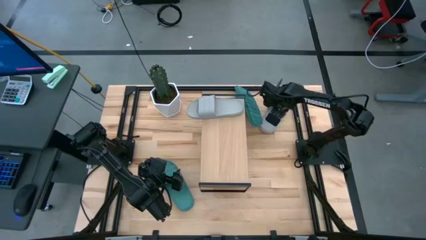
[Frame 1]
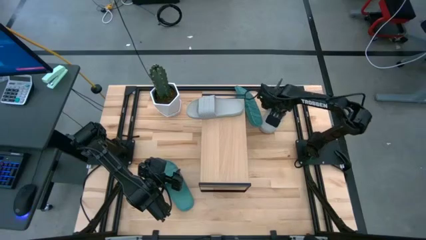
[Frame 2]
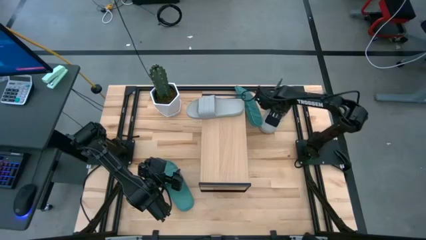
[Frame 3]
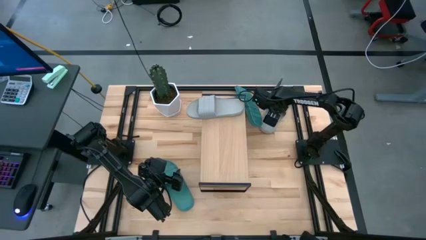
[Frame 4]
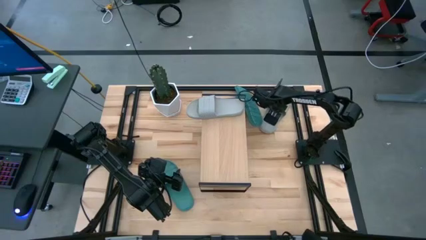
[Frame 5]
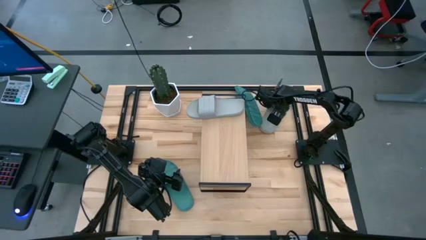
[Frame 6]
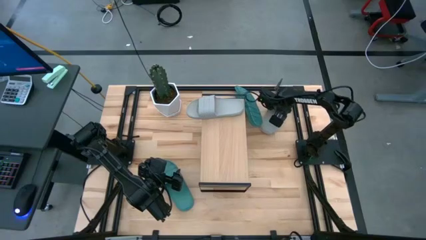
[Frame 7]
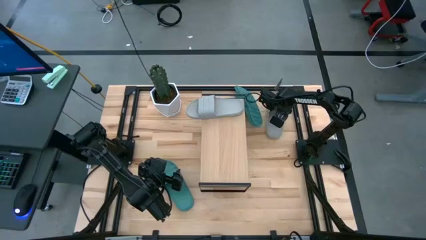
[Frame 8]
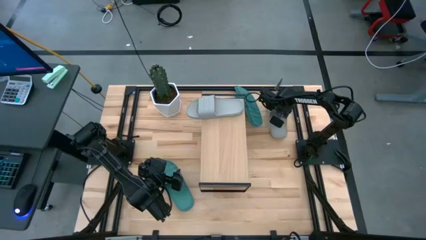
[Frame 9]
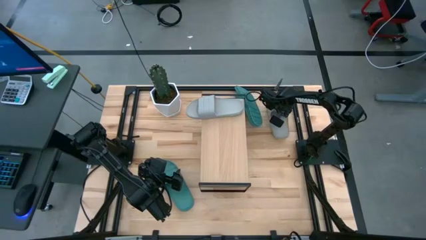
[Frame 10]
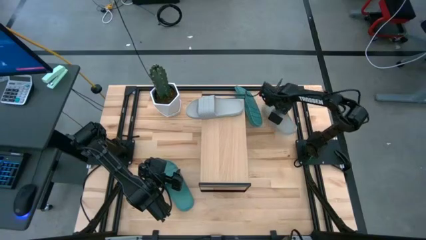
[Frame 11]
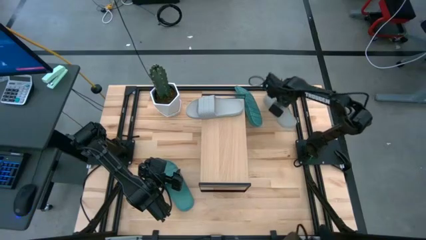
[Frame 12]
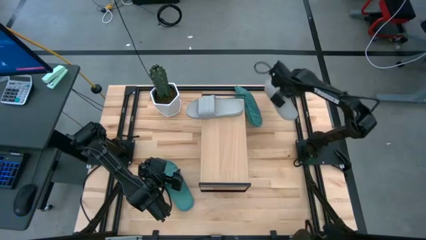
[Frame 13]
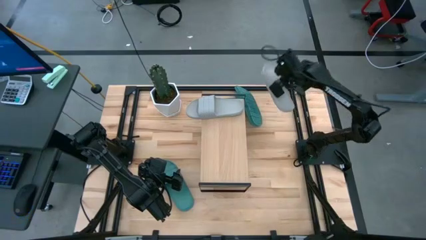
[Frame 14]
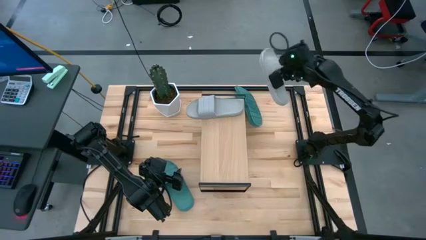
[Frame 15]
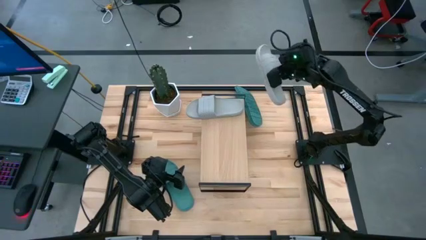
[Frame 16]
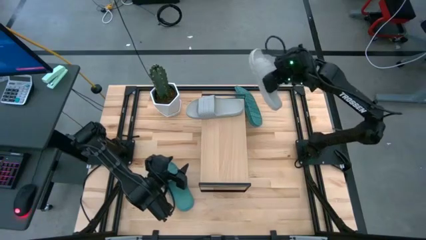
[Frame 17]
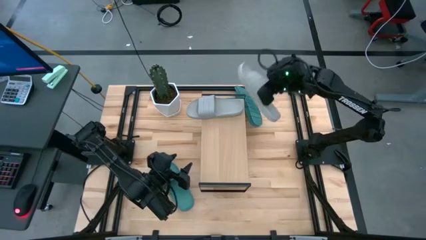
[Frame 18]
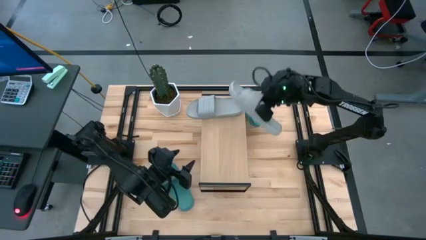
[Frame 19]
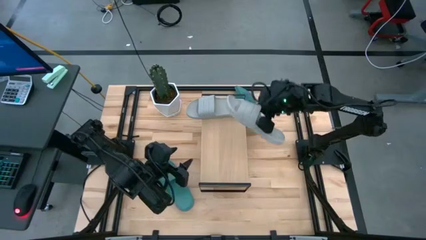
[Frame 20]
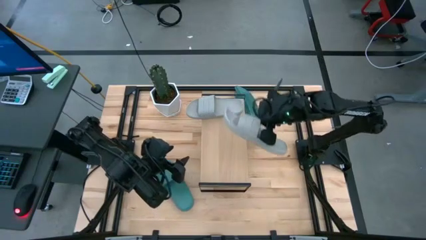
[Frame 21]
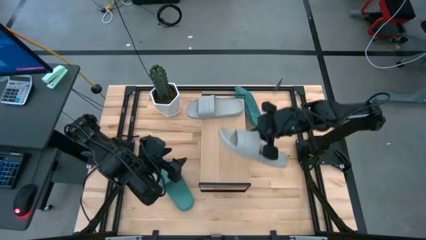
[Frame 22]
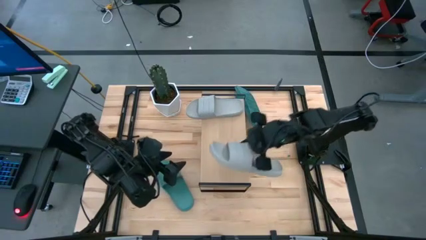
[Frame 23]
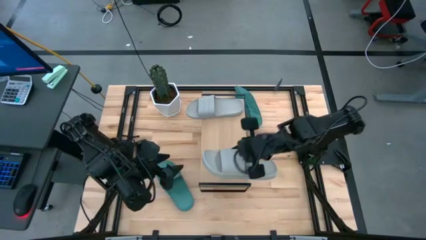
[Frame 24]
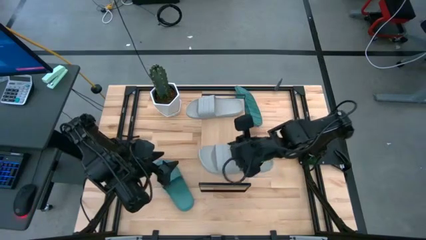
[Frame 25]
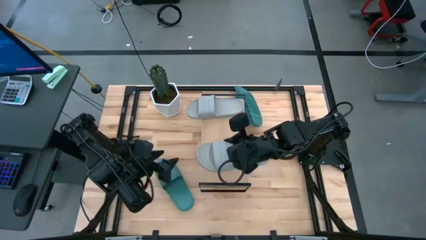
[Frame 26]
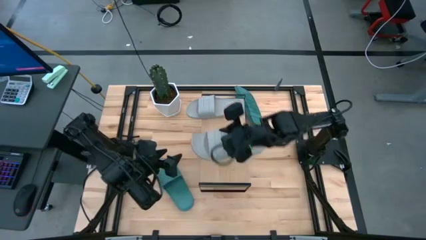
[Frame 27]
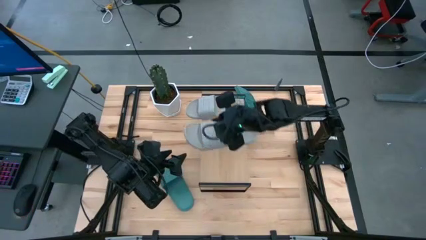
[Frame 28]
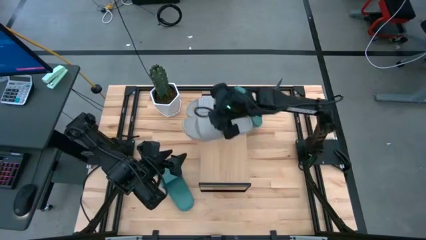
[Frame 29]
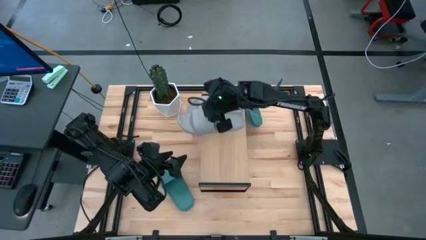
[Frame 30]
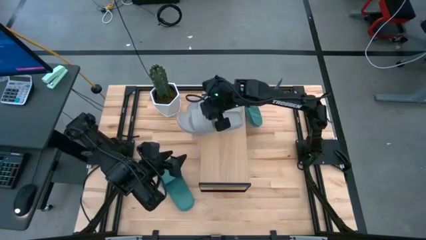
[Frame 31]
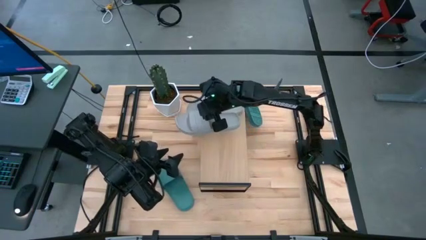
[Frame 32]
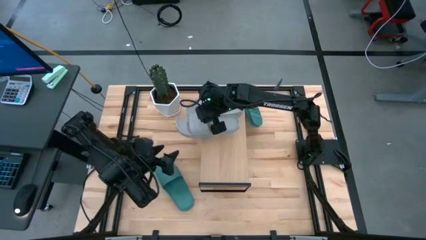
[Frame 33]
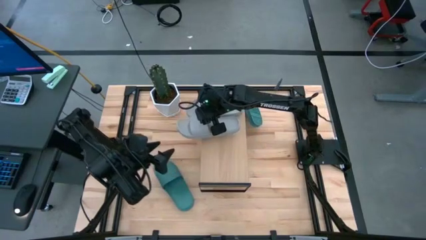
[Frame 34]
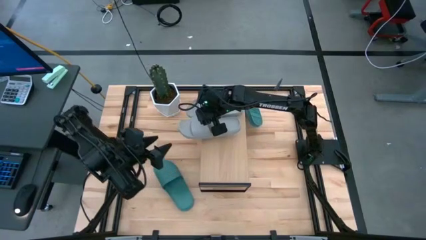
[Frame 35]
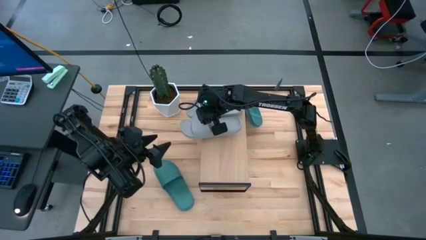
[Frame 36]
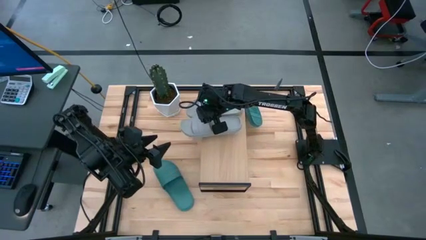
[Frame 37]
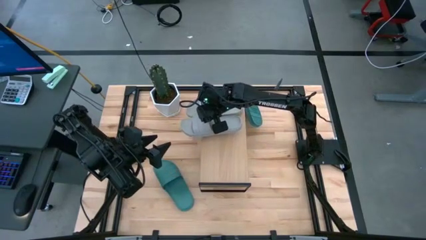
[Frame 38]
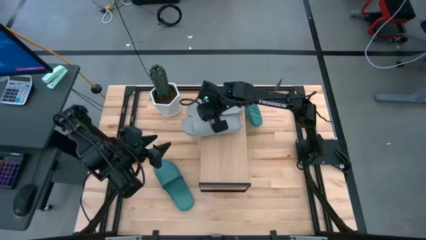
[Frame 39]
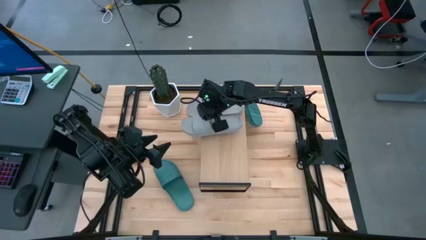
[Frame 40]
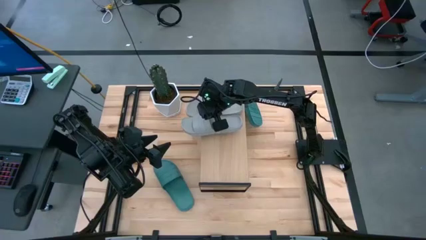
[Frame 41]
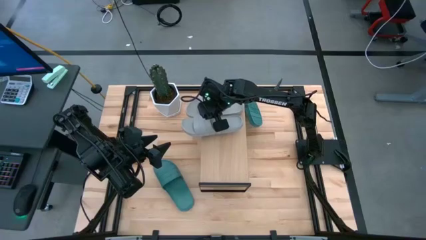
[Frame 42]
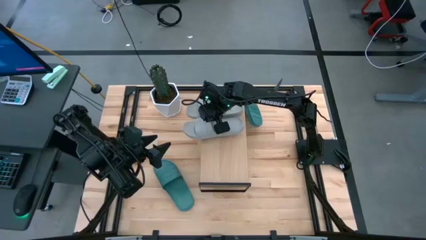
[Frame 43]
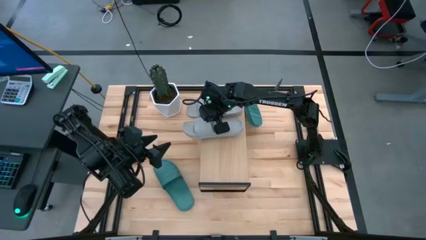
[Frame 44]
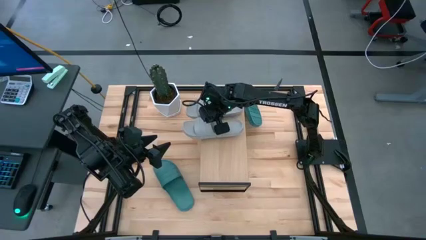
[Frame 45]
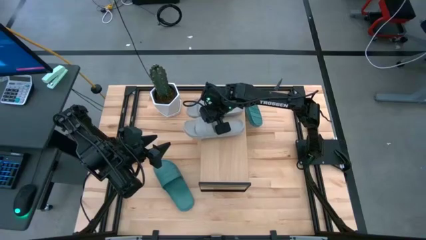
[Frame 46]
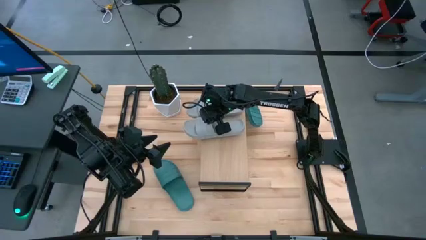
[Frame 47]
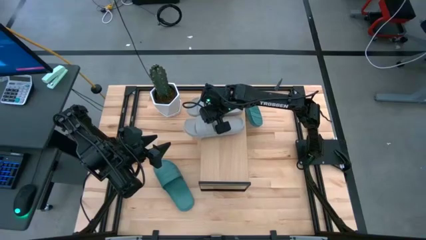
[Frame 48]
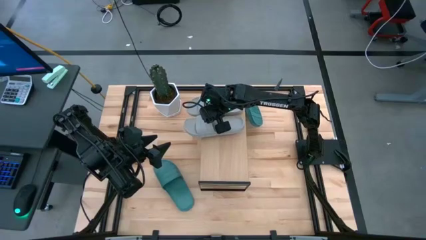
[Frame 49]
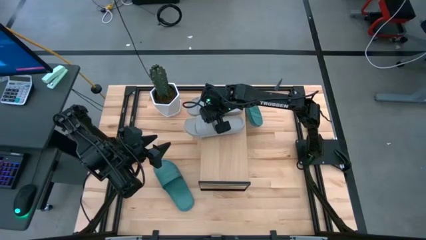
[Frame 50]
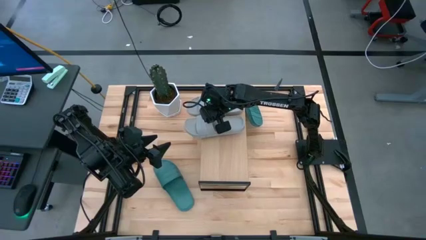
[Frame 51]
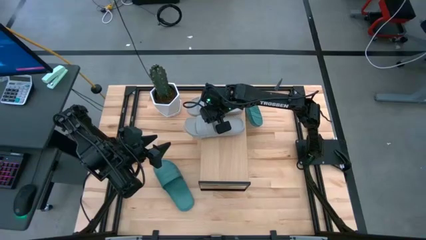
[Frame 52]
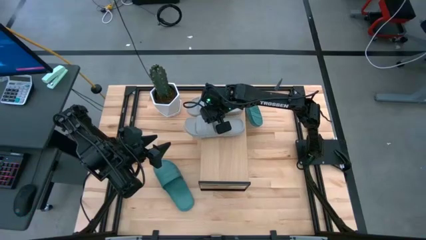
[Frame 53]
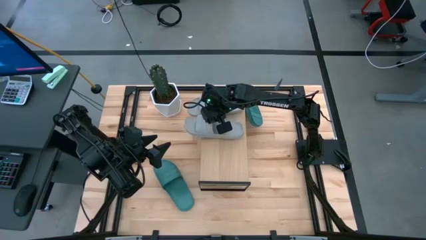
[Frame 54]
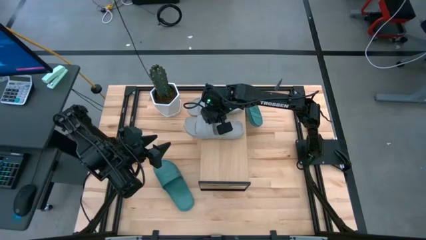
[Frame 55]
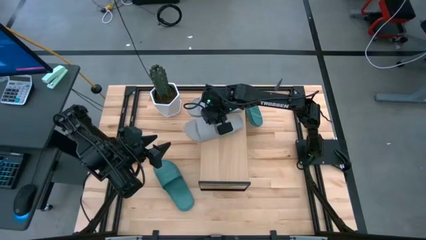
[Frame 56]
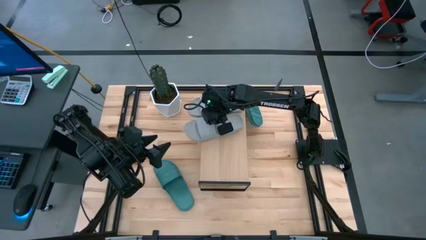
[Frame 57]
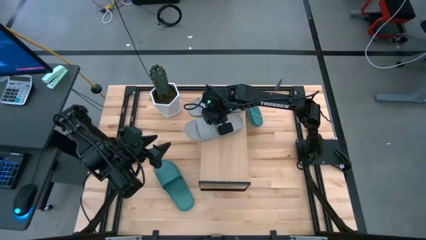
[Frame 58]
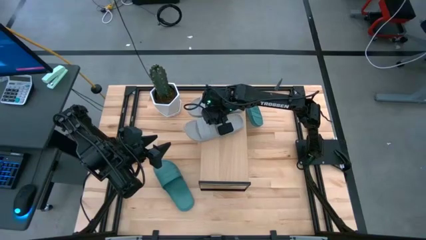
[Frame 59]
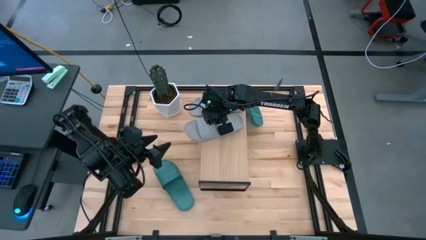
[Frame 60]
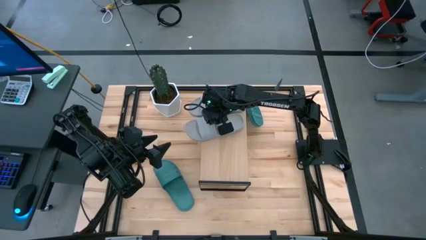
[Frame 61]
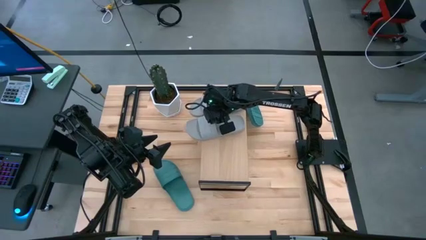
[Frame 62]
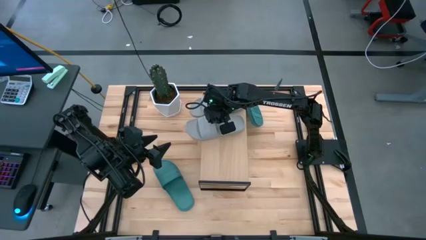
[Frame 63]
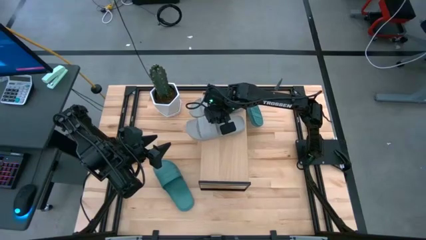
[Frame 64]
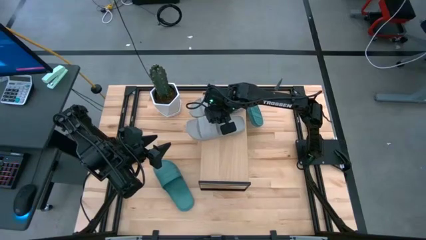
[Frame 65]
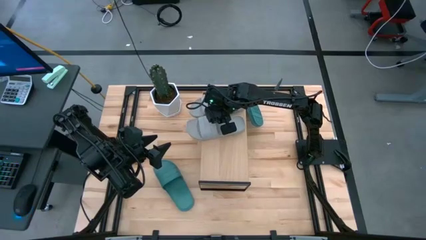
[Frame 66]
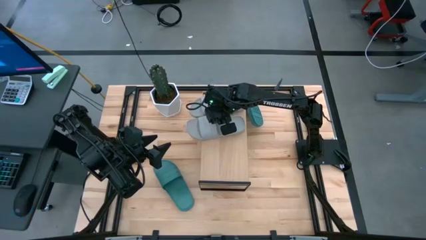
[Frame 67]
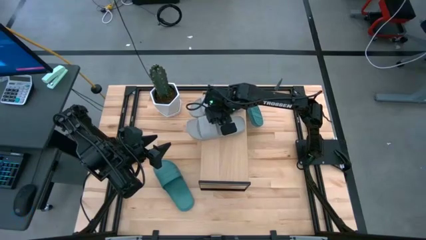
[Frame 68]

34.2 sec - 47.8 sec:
Task: Pick and place slides into the shelf
Put the gray slipper on the shelf
